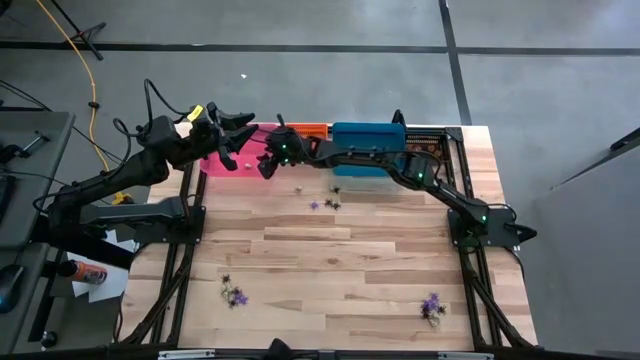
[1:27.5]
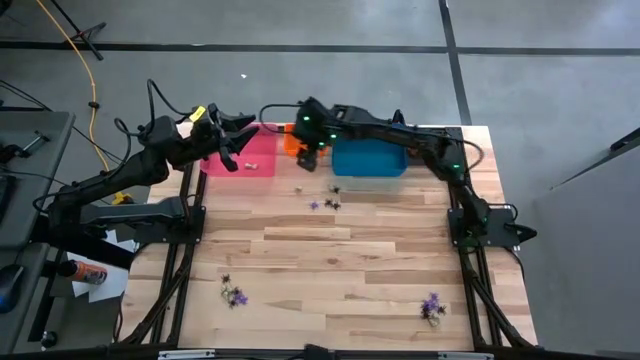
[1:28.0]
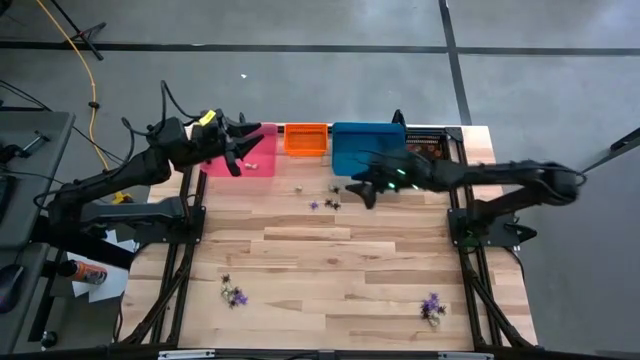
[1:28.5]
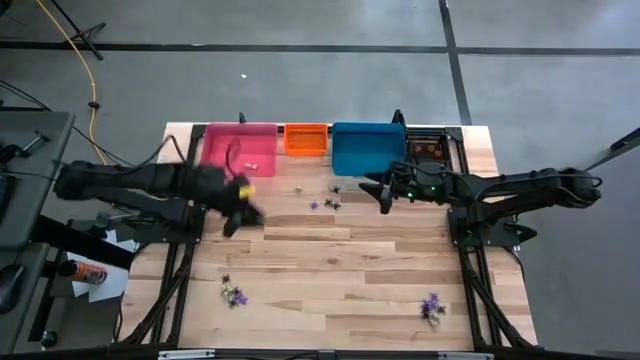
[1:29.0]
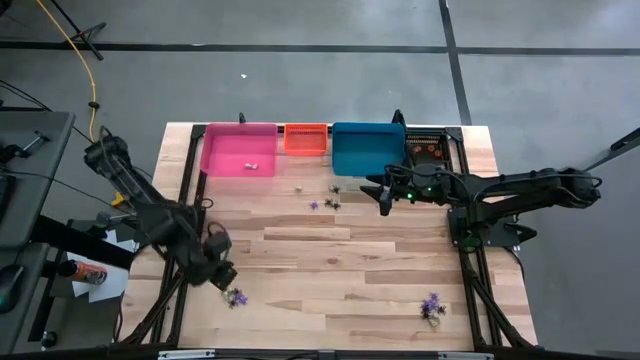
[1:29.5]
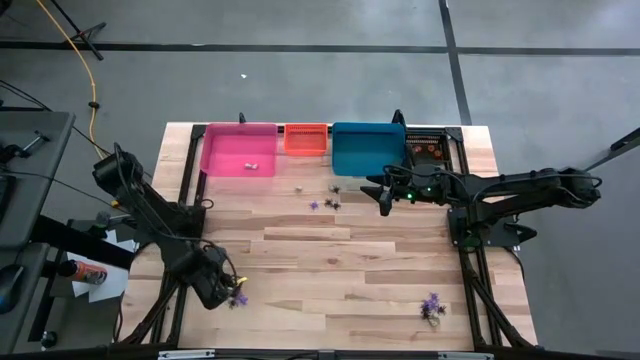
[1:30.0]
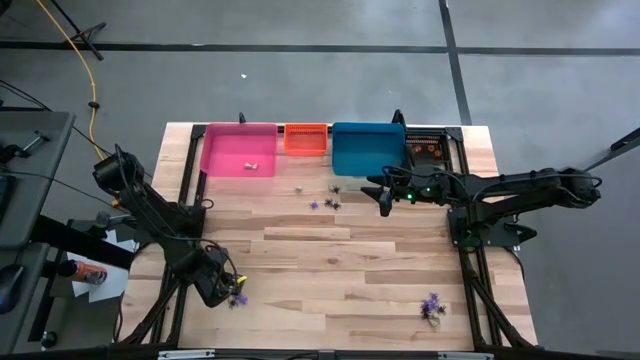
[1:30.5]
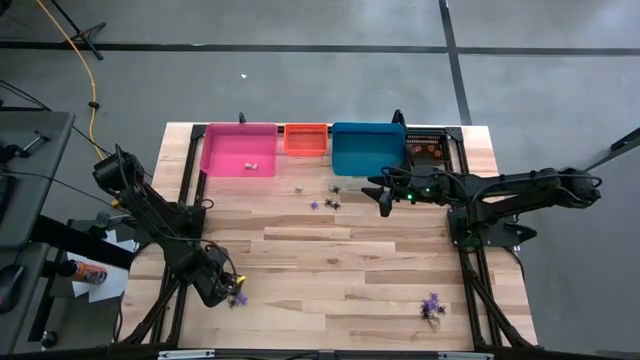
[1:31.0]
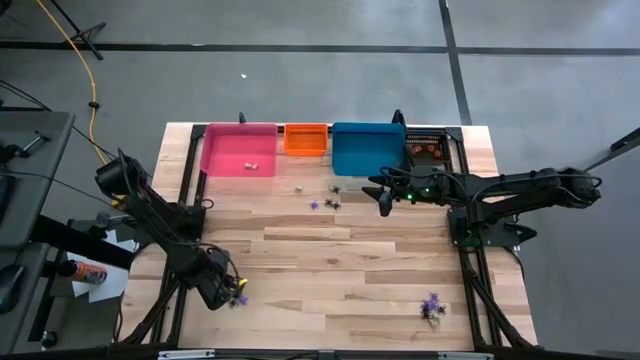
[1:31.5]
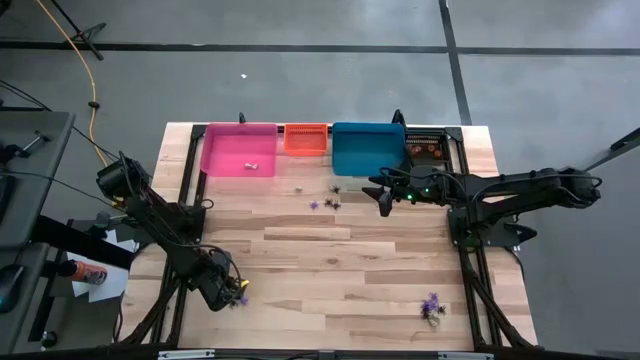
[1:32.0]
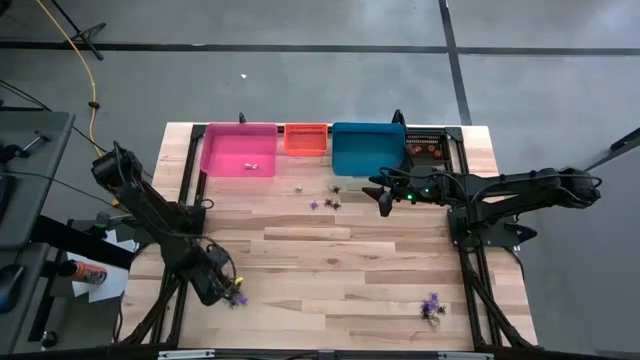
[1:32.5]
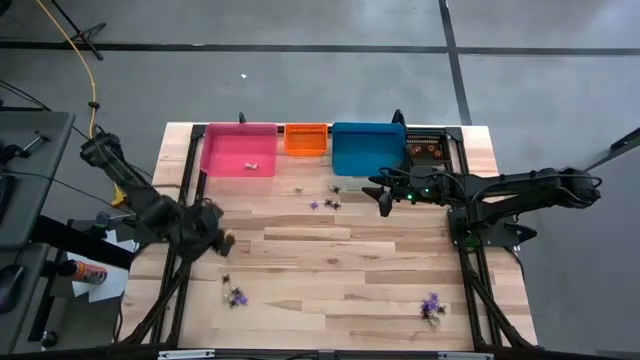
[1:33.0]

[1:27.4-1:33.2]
Task: Sort Halloween decoration
Put the white skull toy into the pink bin

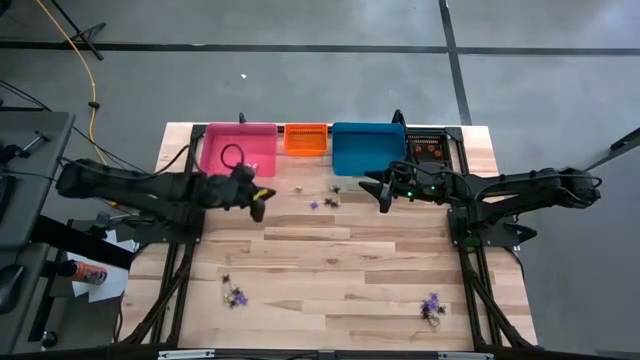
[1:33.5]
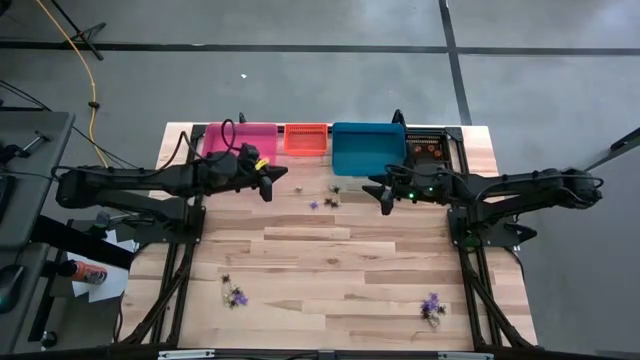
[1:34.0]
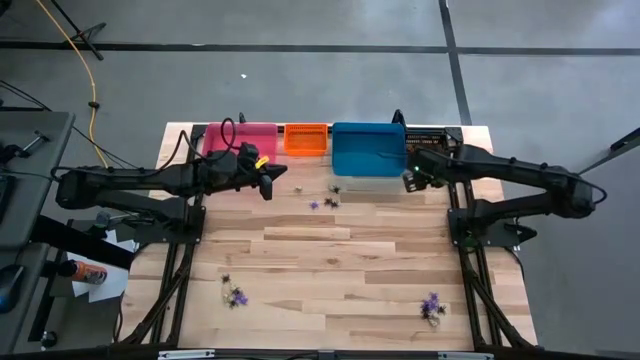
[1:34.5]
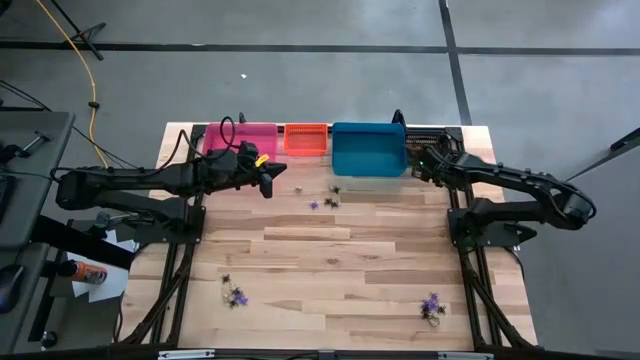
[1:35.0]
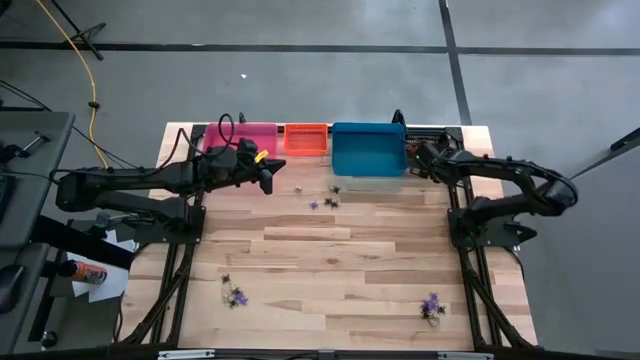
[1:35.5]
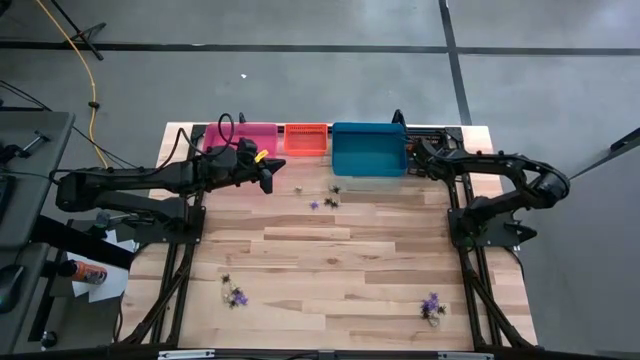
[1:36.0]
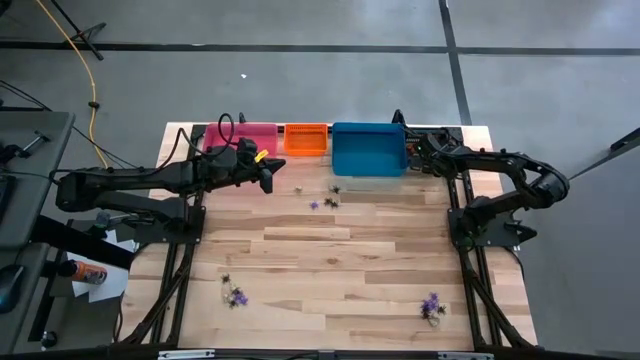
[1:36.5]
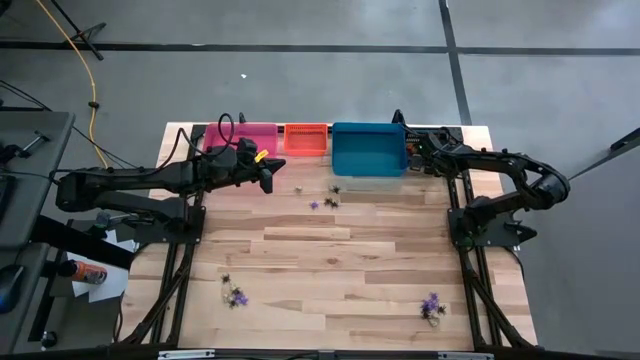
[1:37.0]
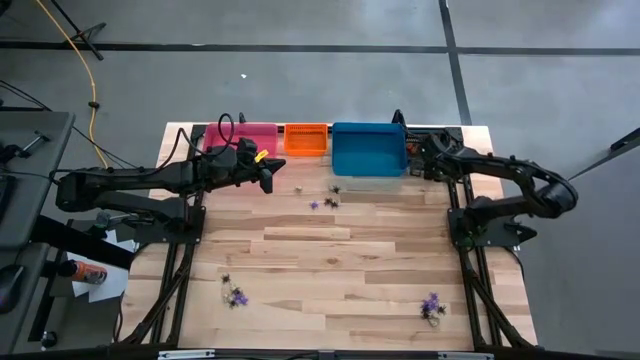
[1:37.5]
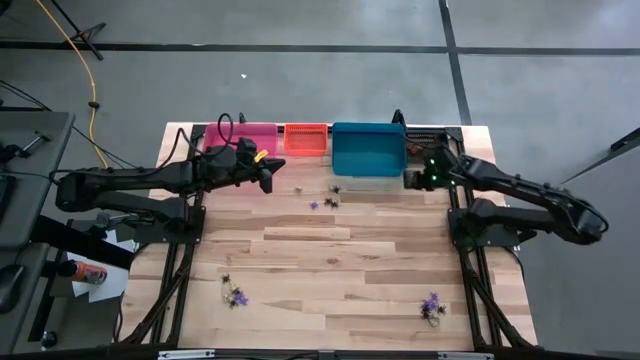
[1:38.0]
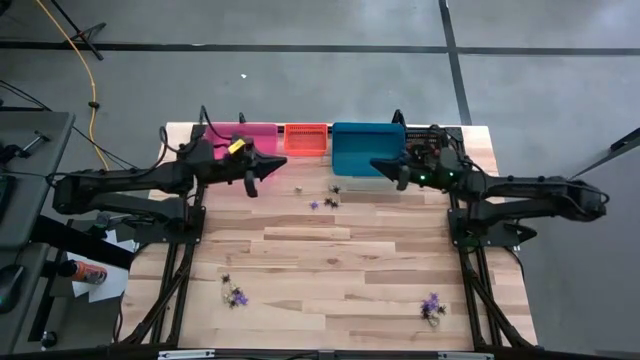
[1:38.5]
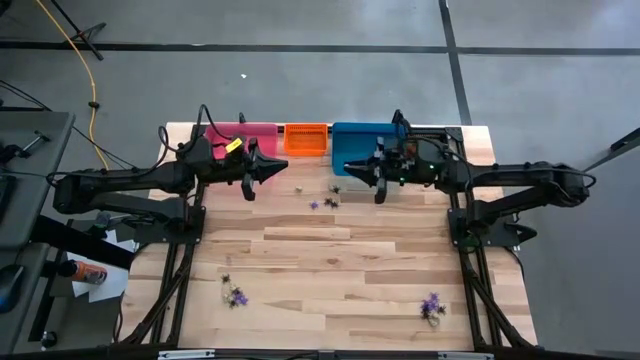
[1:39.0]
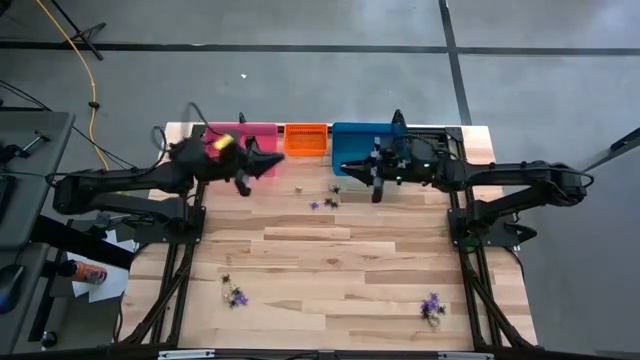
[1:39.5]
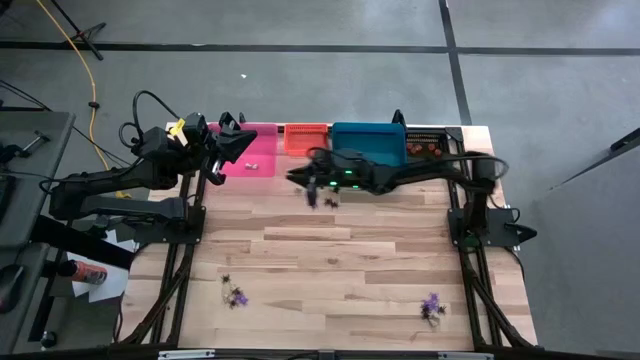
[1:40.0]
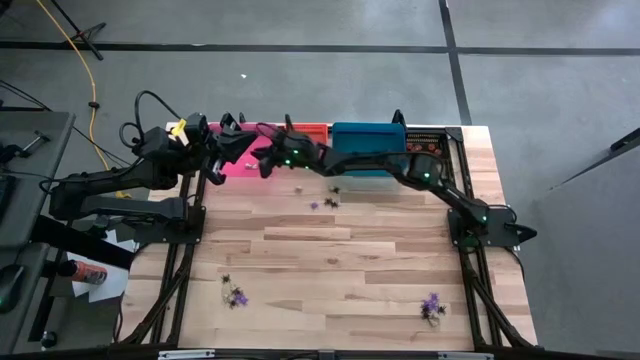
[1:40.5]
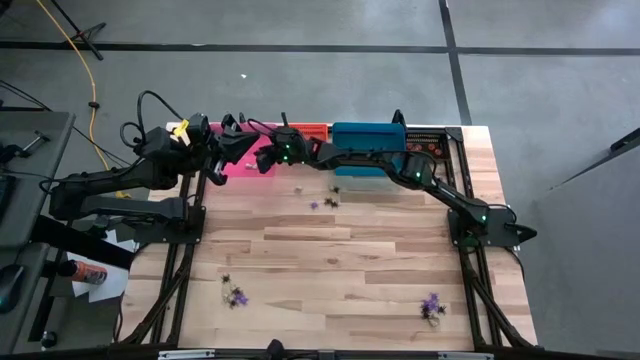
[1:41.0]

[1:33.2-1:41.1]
Put the white skull toy into the pink bin

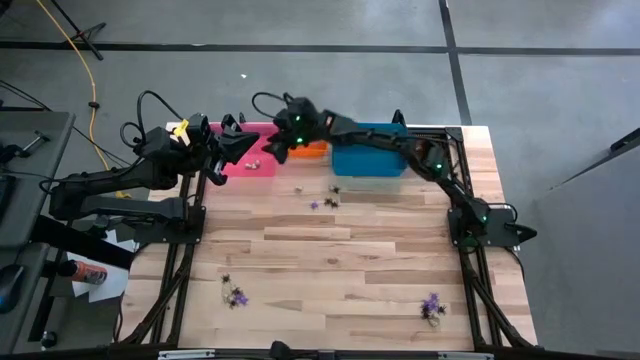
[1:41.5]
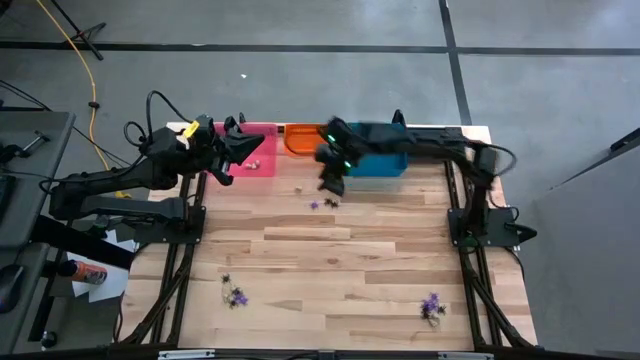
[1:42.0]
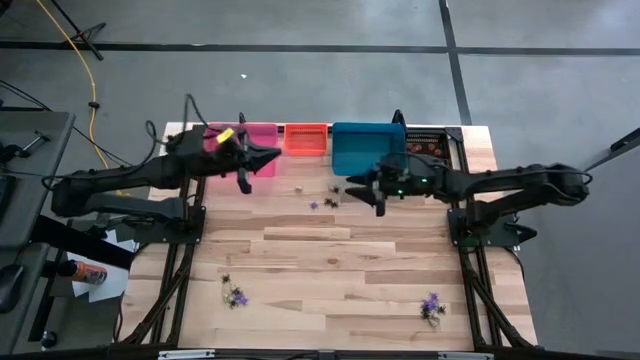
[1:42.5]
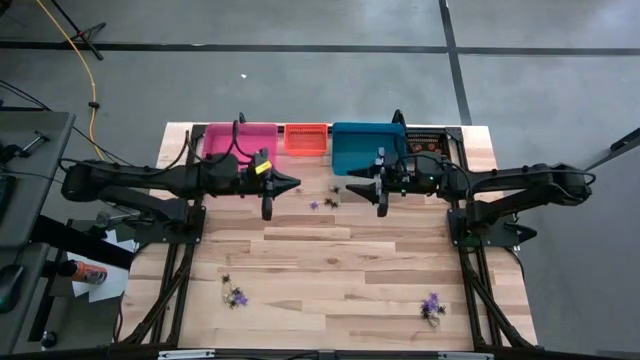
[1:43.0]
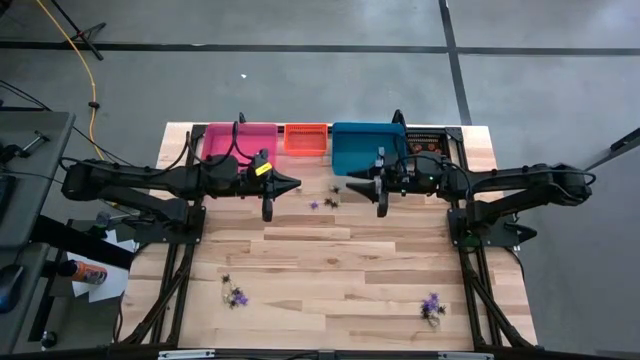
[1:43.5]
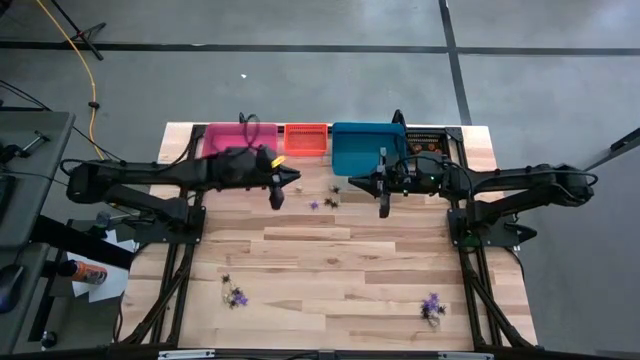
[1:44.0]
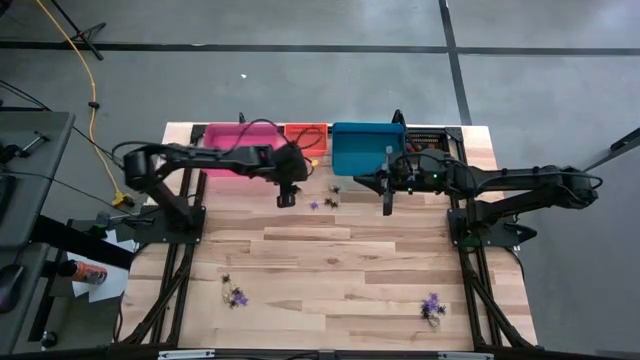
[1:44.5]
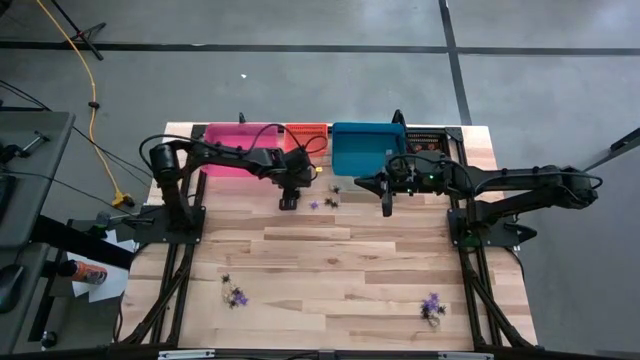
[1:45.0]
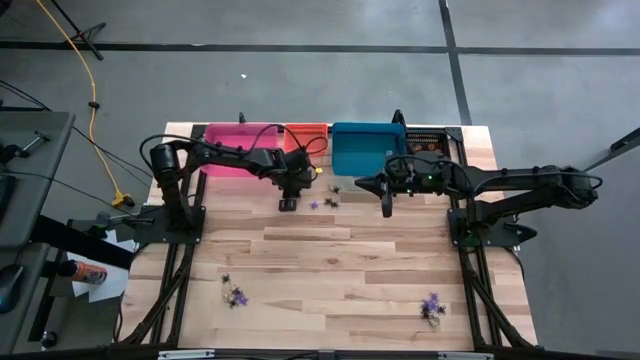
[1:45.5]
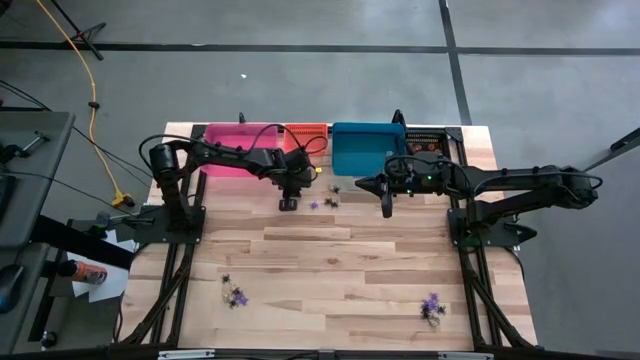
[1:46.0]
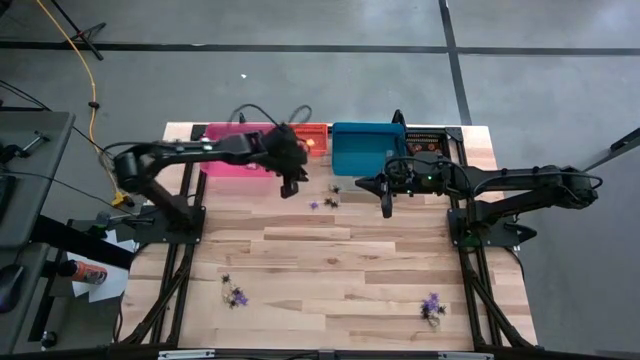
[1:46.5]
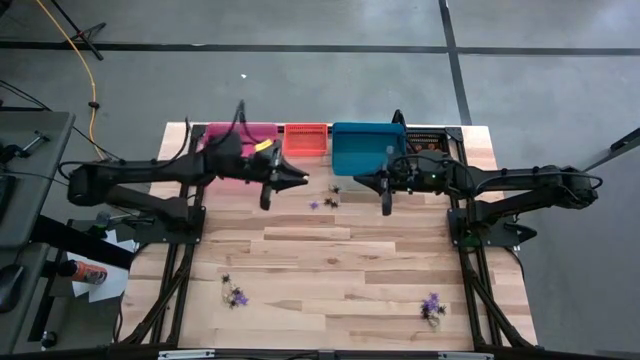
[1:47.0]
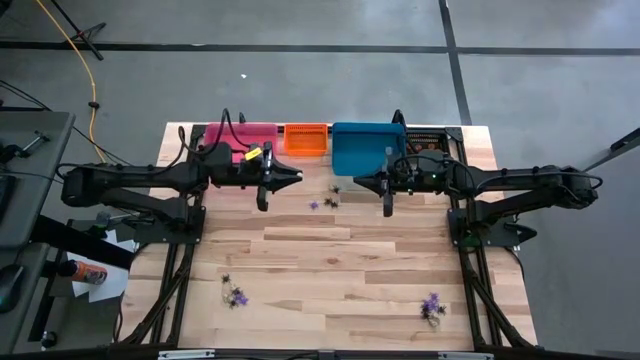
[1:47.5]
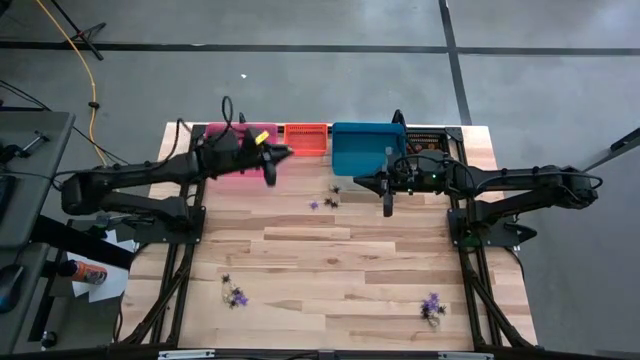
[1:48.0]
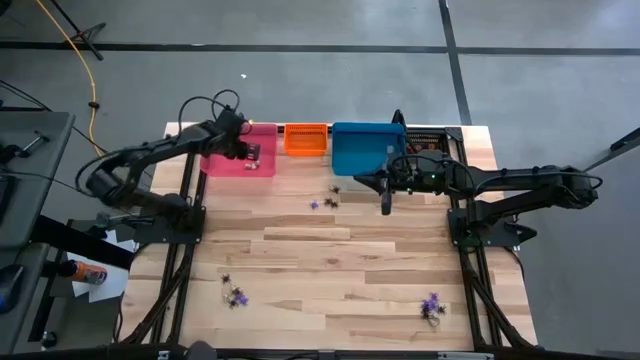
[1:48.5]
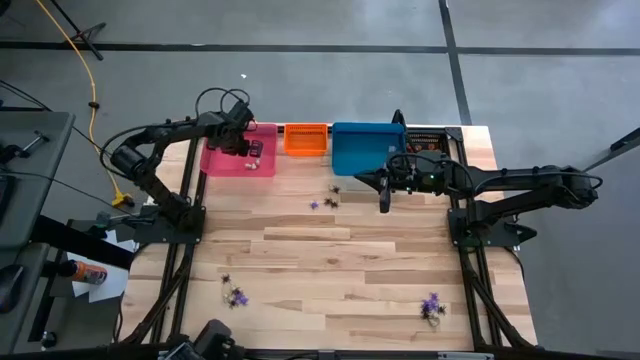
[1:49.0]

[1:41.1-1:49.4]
Put the white skull toy into the pink bin
